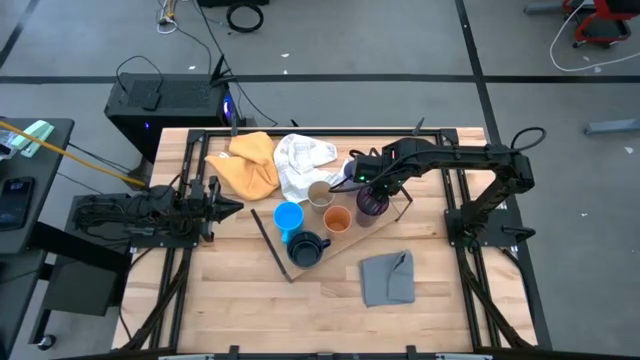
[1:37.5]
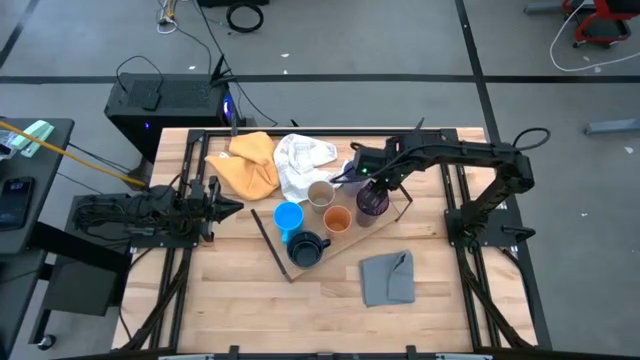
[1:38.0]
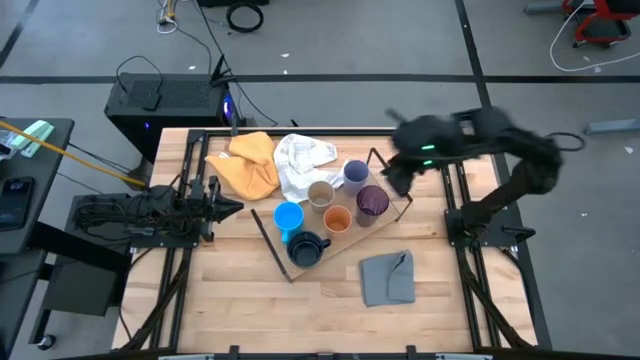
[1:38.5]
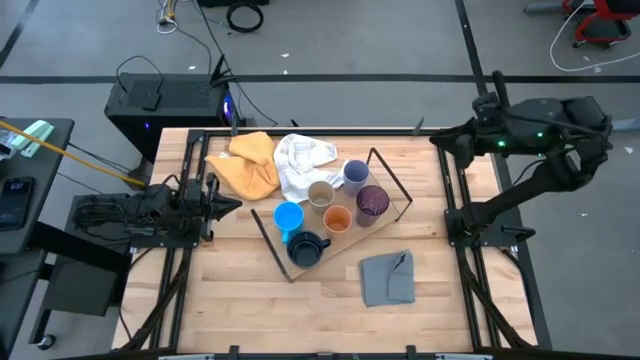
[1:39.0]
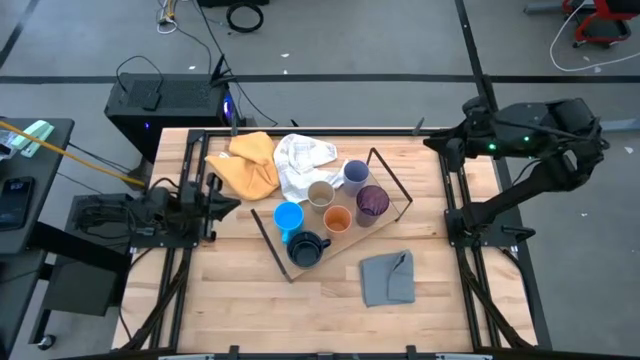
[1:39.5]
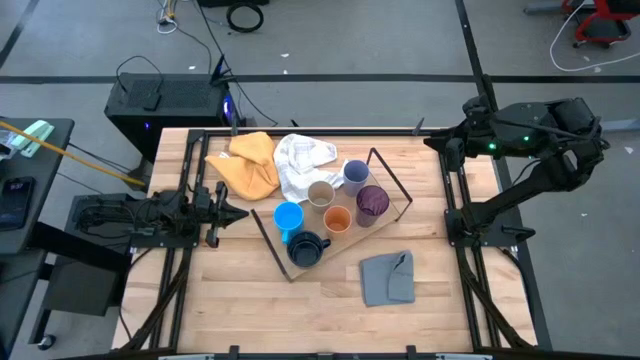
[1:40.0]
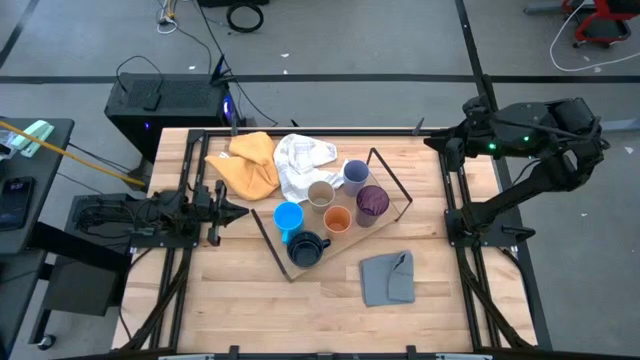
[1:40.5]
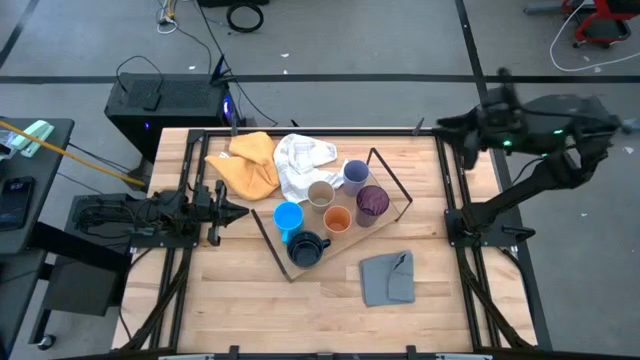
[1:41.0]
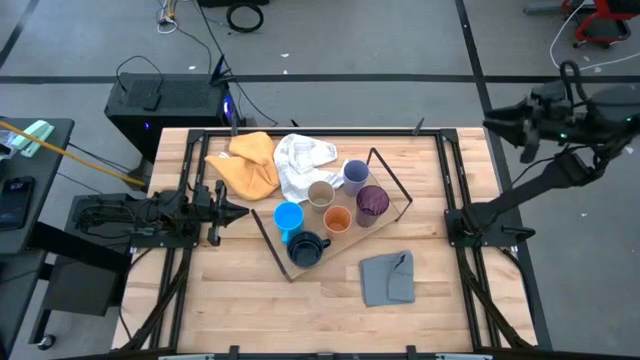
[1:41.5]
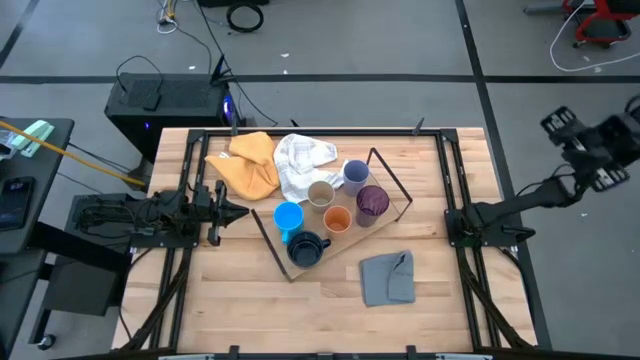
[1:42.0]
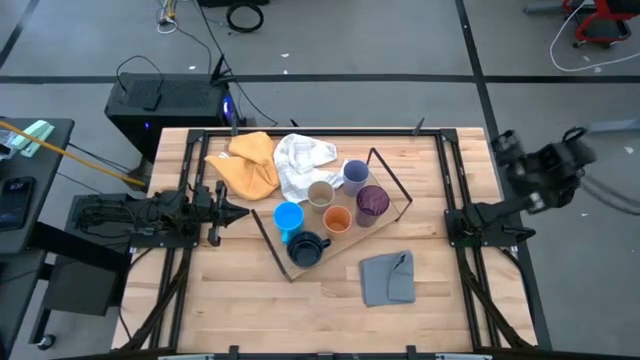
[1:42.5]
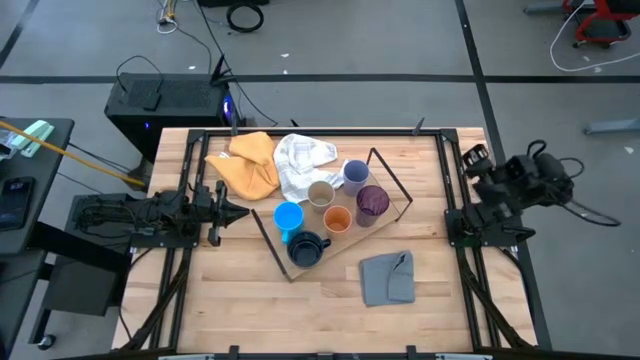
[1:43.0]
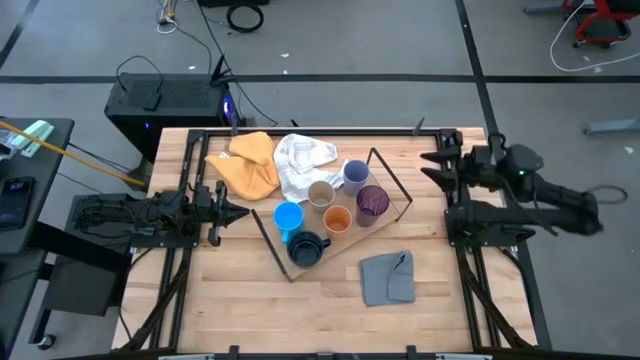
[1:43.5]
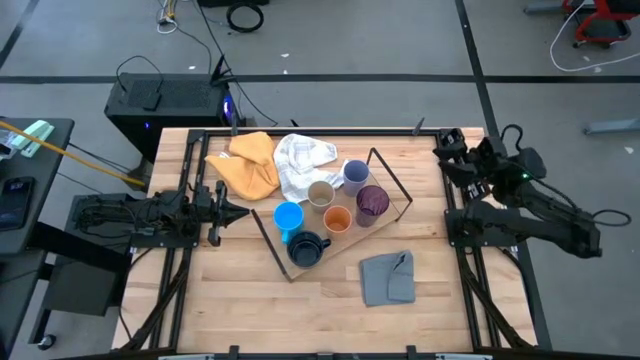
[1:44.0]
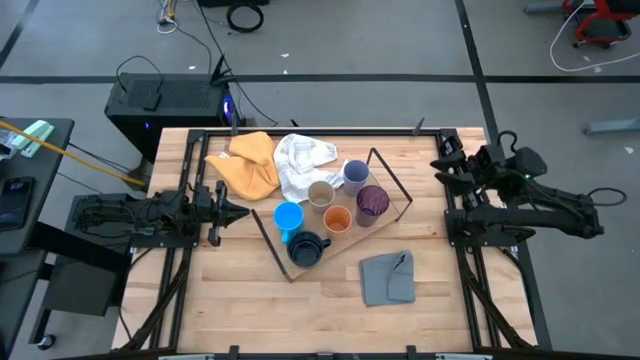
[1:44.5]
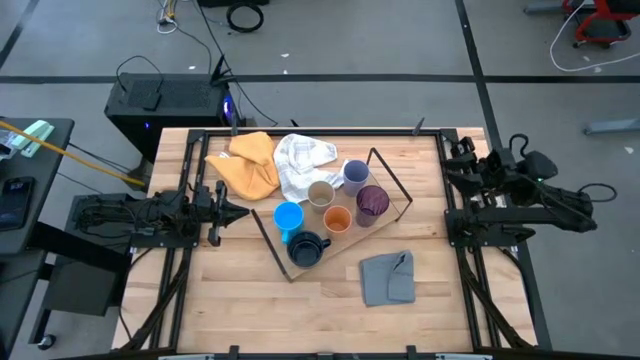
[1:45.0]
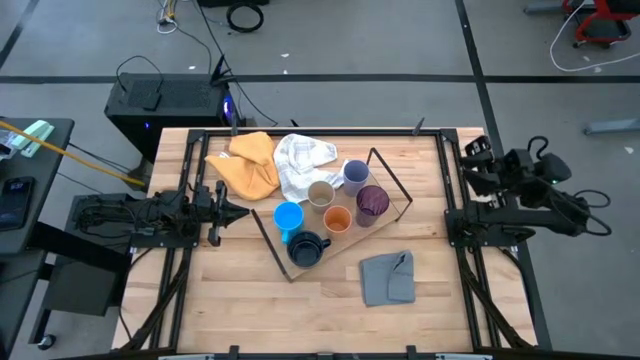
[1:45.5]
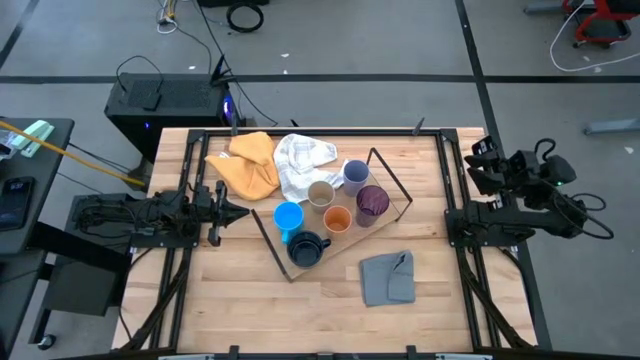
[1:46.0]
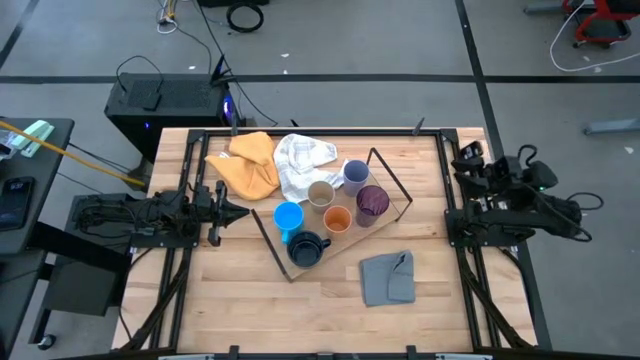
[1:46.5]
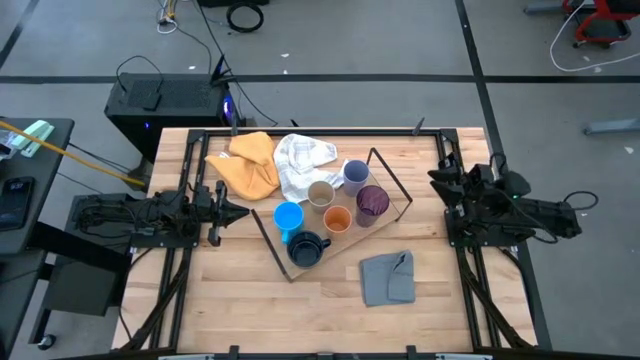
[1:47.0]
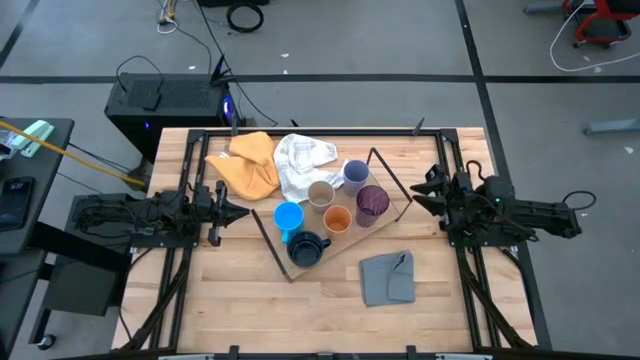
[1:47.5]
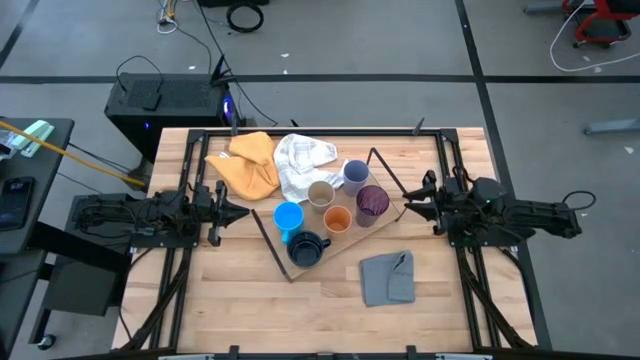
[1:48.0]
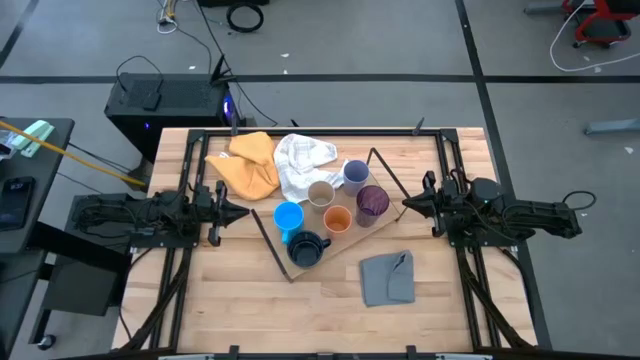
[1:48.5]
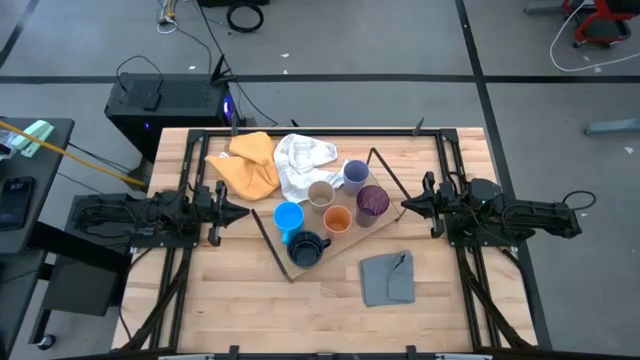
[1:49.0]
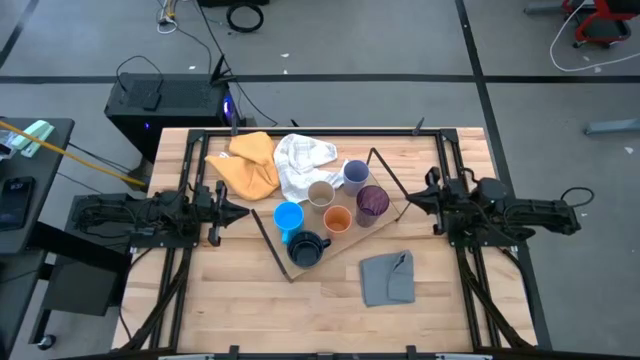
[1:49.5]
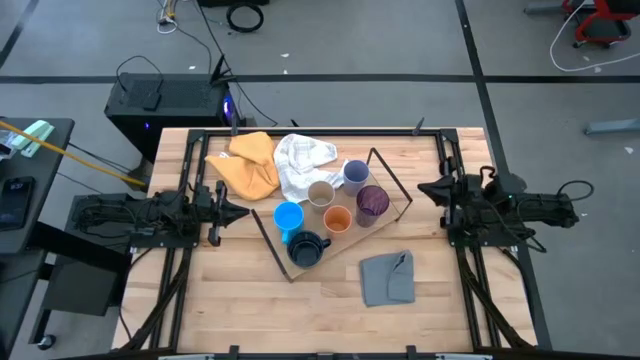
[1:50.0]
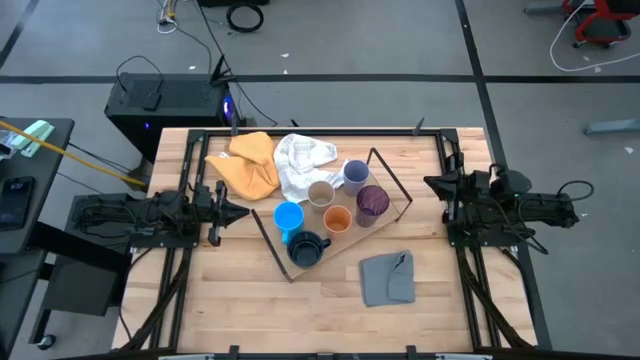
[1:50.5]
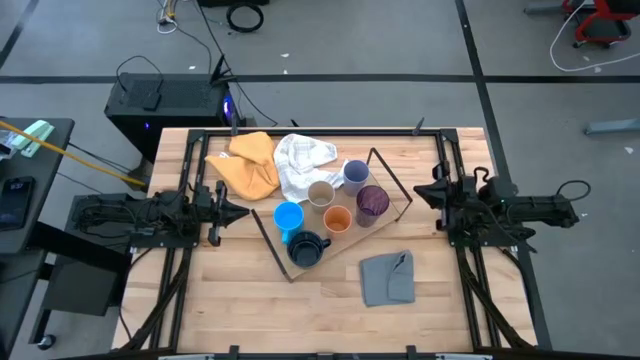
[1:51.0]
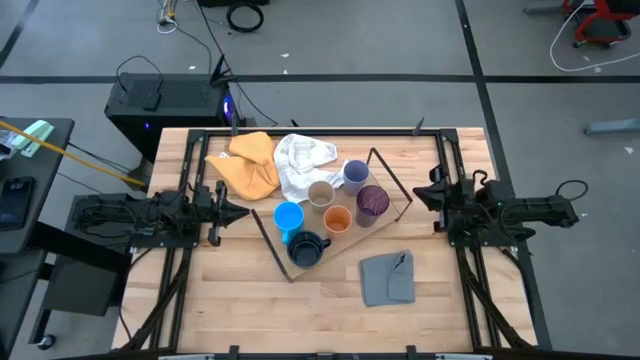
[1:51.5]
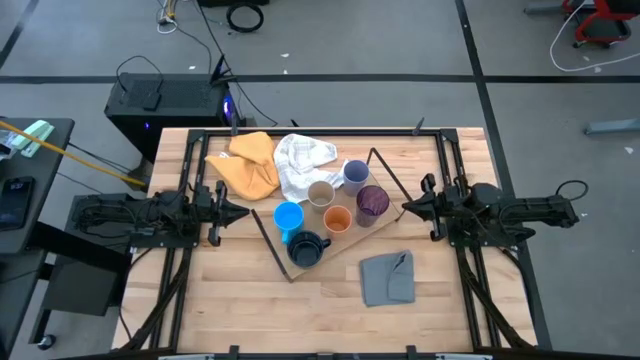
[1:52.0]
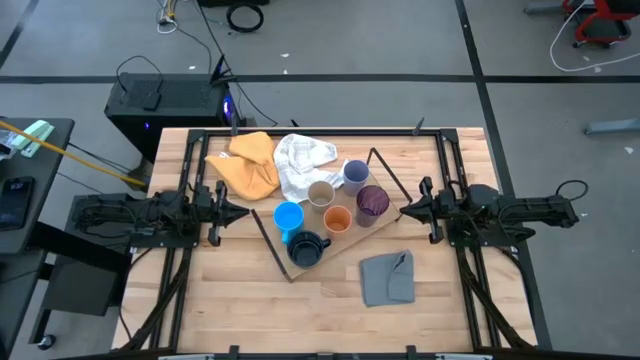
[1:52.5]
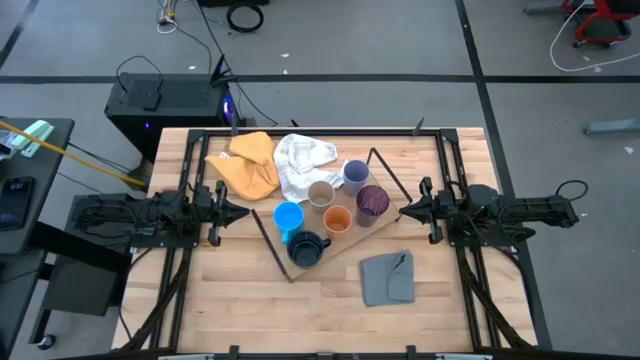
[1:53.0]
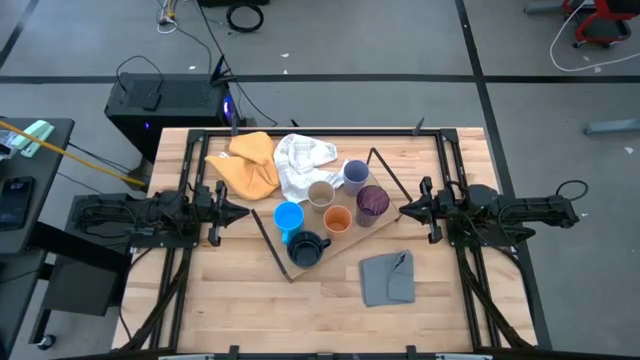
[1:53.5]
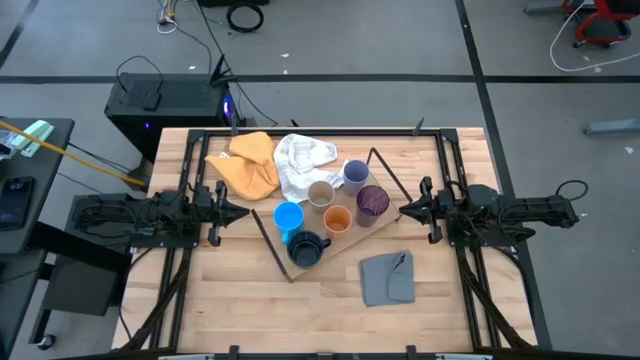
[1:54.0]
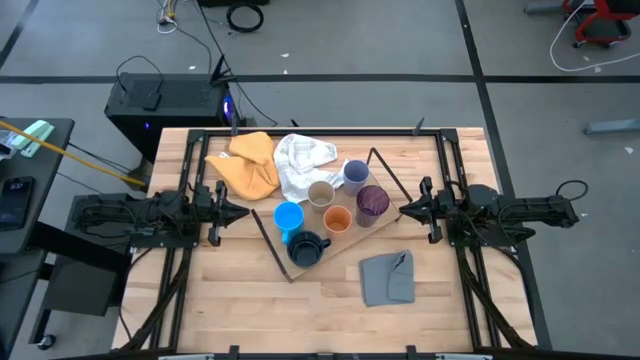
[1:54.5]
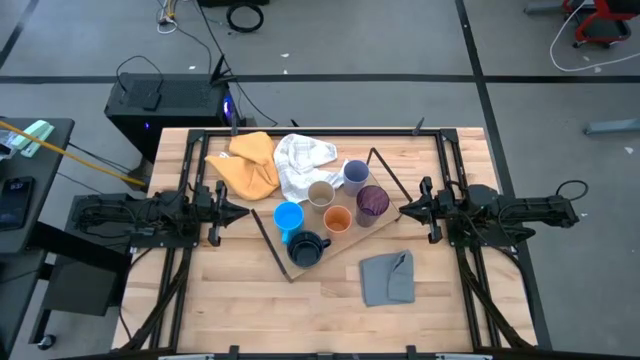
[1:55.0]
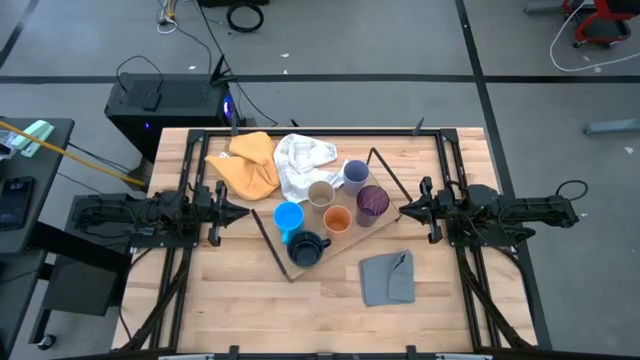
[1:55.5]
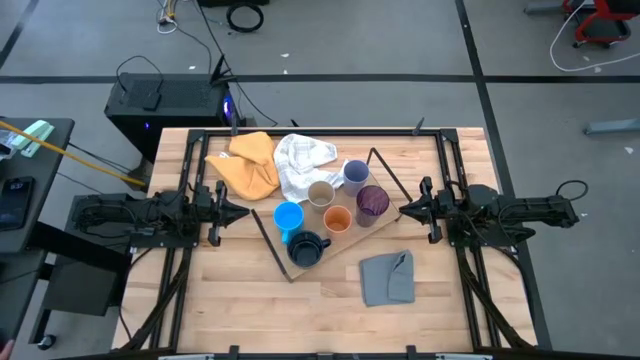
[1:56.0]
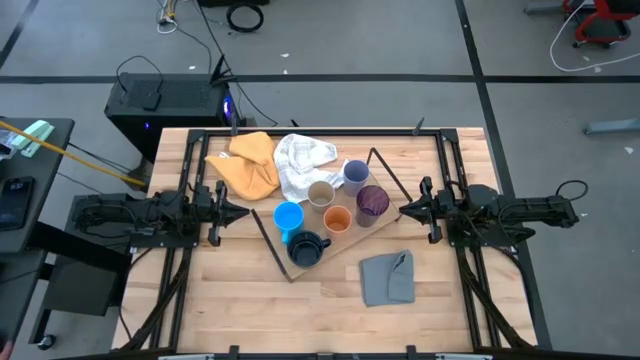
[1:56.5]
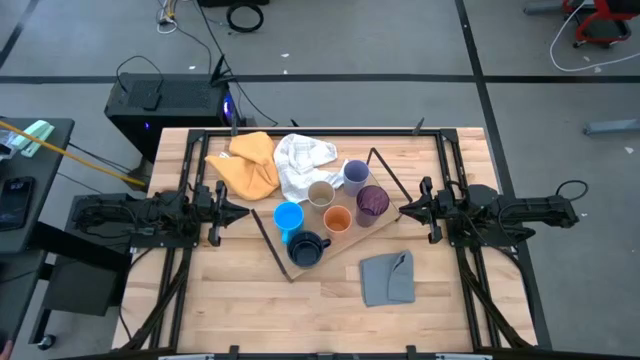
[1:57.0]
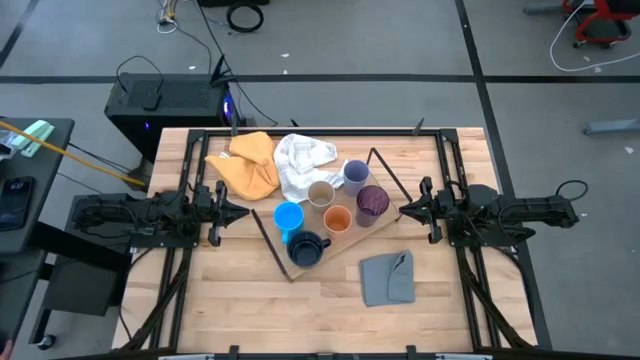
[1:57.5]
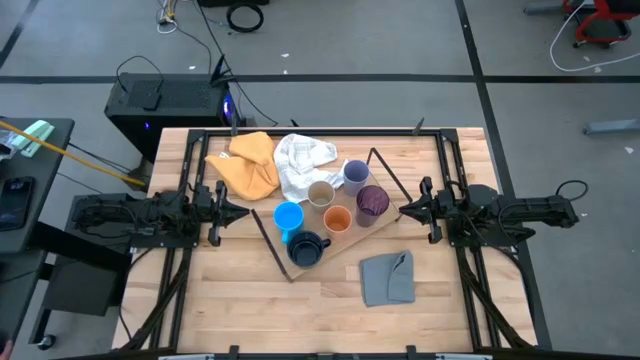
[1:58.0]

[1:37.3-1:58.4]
Task: Stack small to large cups/mugs on shelf
Return to Home Position
